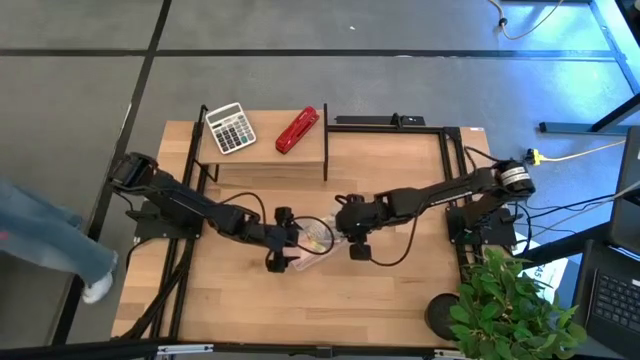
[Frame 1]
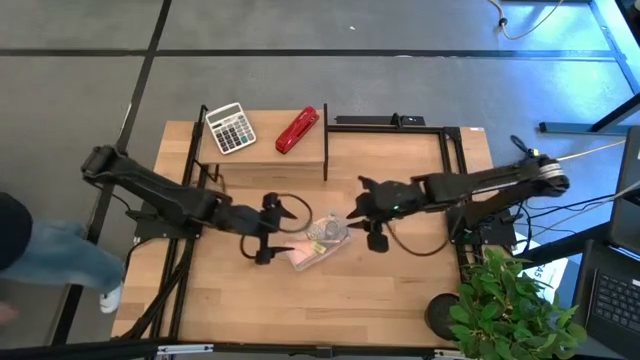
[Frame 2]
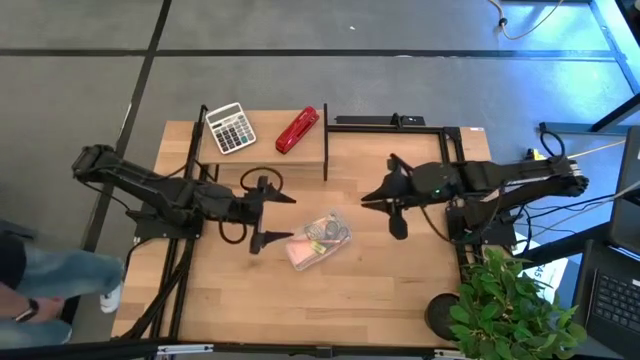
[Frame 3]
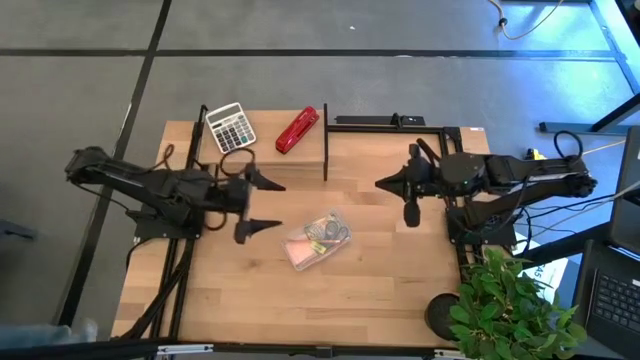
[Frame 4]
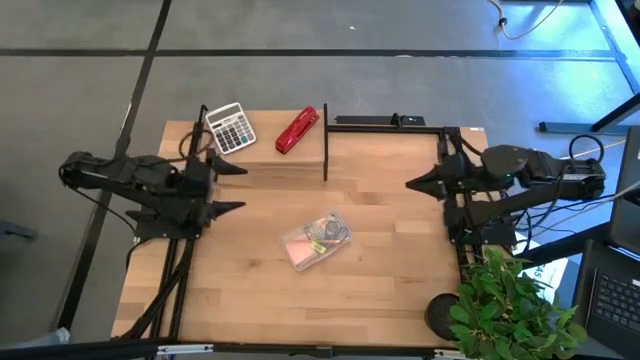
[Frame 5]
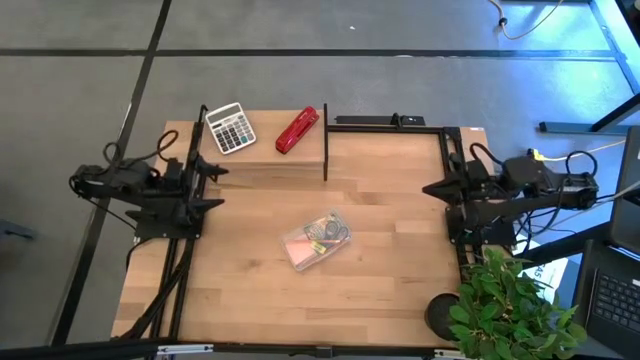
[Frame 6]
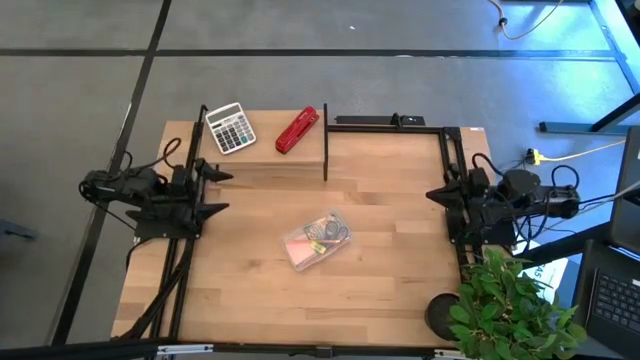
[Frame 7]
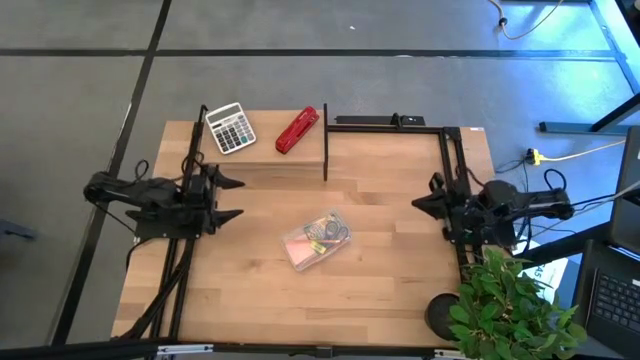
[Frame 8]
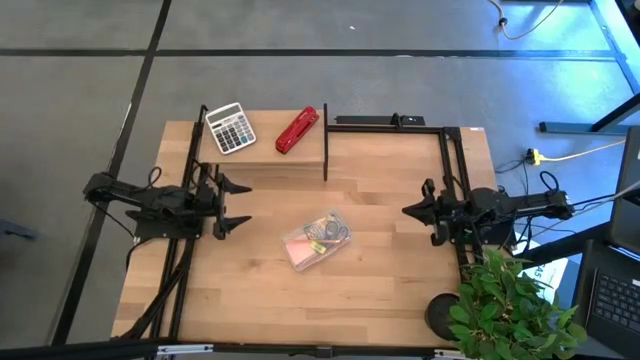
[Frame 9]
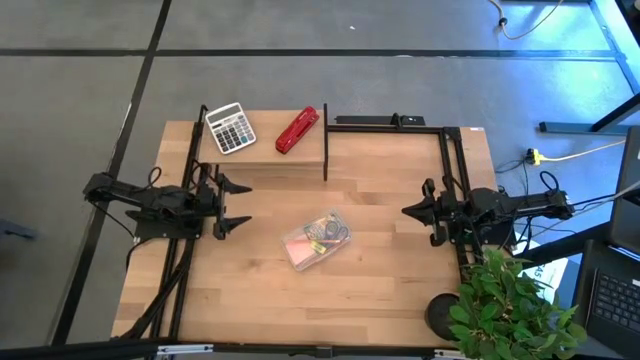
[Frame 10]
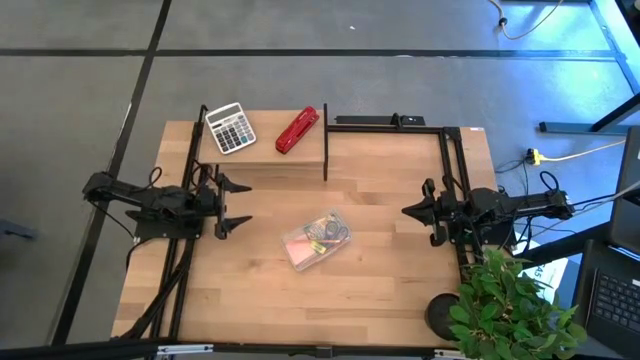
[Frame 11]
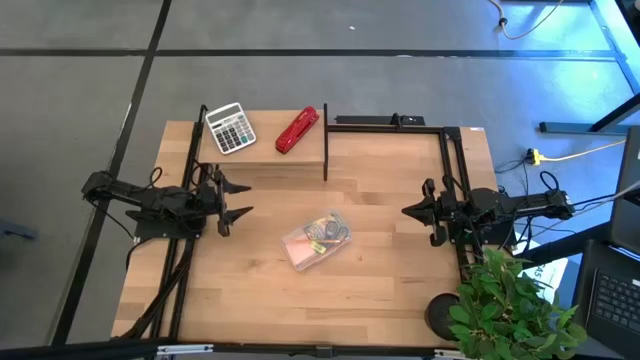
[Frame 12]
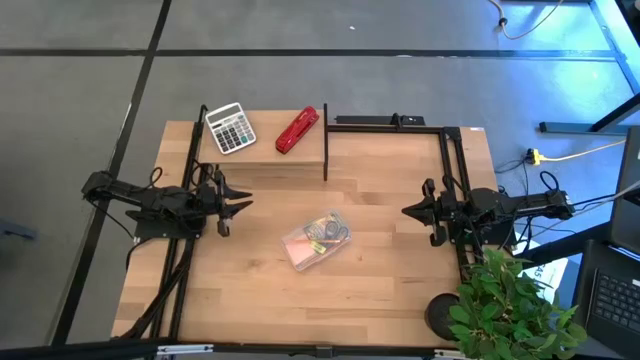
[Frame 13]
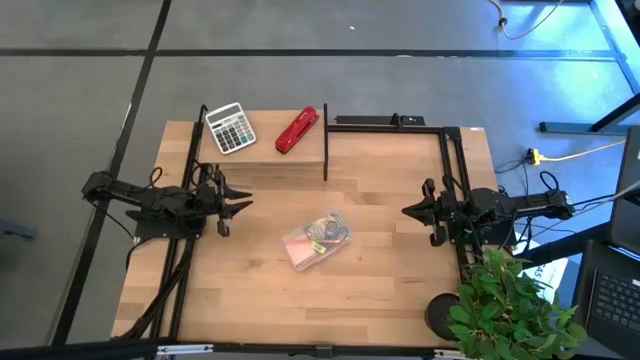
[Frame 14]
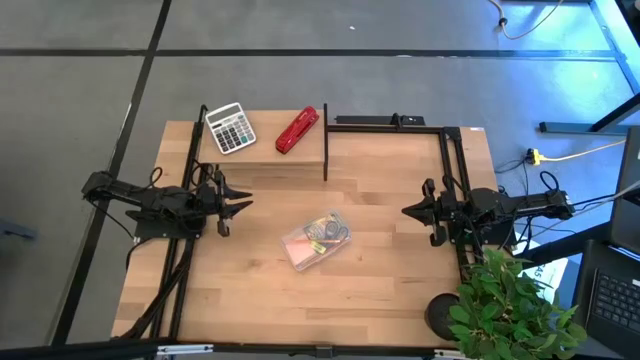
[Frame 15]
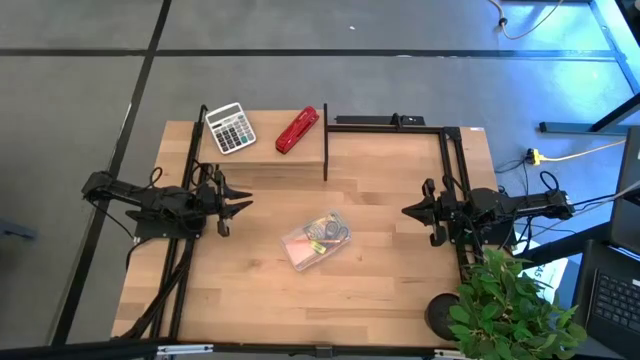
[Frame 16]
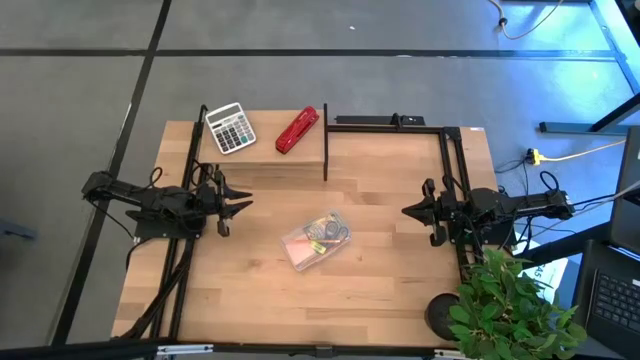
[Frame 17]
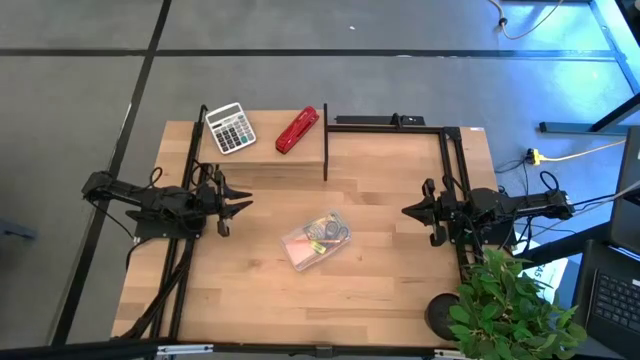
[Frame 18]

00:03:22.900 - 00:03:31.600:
Task: Pack school essentials
Return to Home Position
